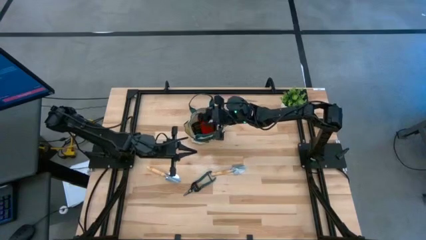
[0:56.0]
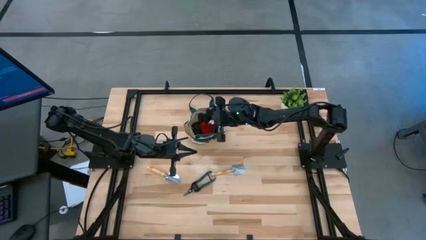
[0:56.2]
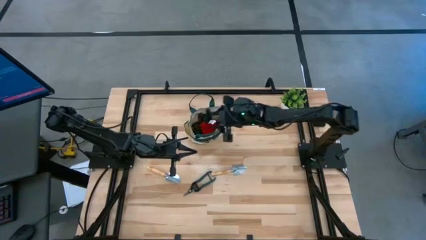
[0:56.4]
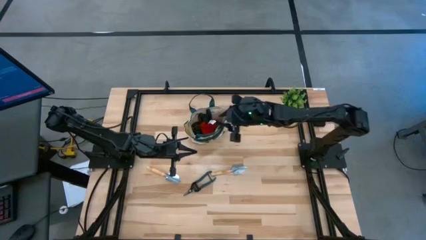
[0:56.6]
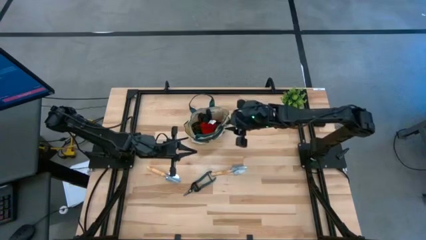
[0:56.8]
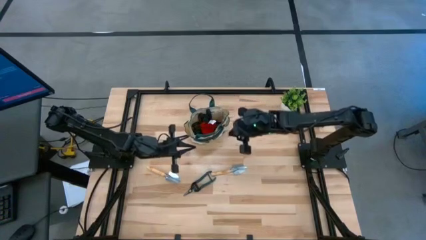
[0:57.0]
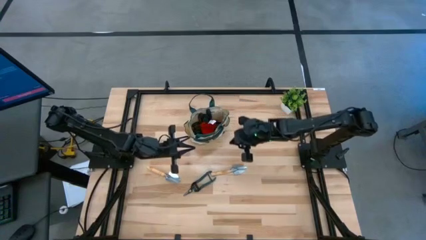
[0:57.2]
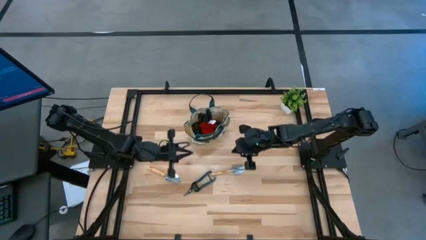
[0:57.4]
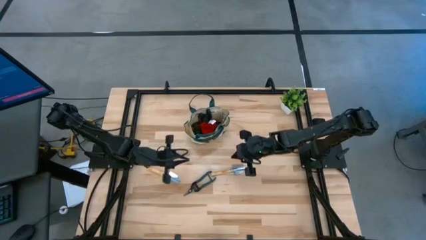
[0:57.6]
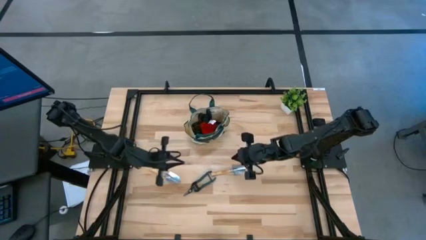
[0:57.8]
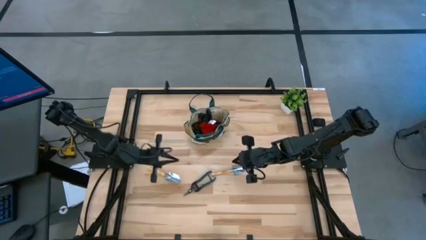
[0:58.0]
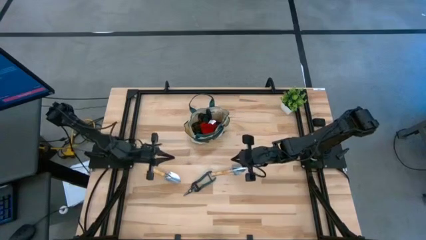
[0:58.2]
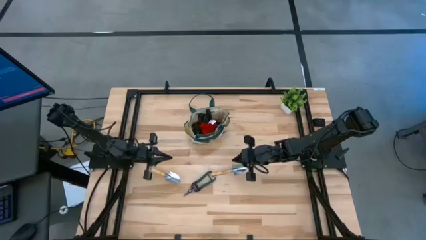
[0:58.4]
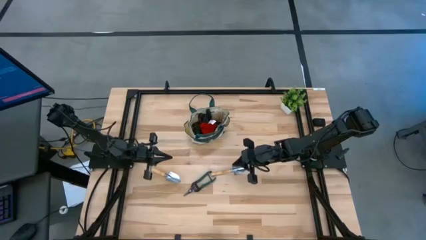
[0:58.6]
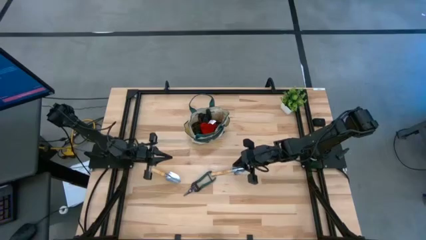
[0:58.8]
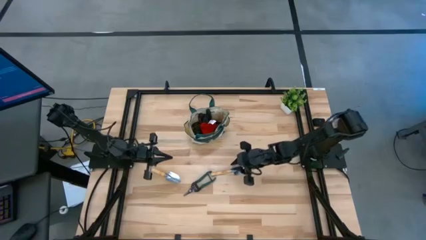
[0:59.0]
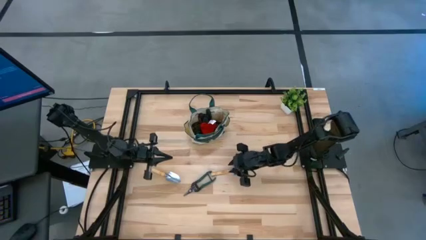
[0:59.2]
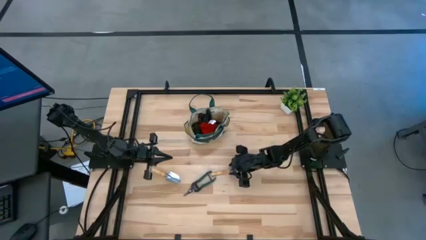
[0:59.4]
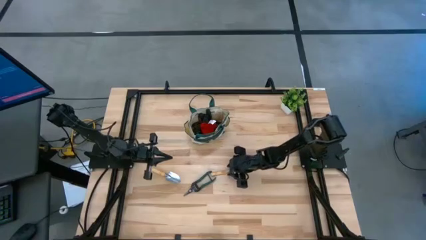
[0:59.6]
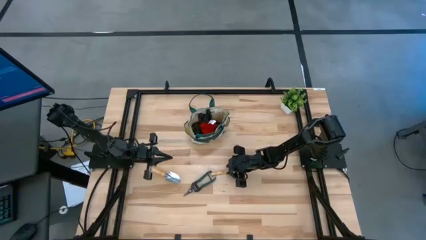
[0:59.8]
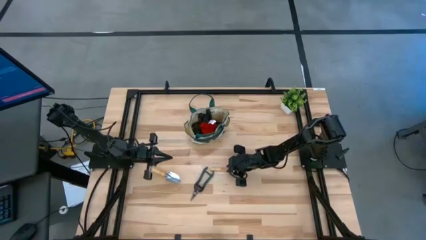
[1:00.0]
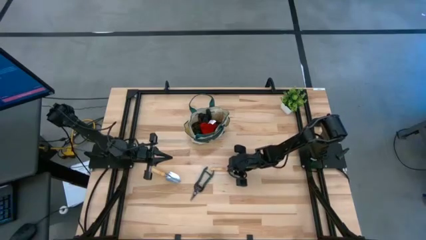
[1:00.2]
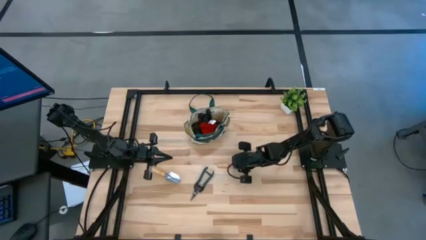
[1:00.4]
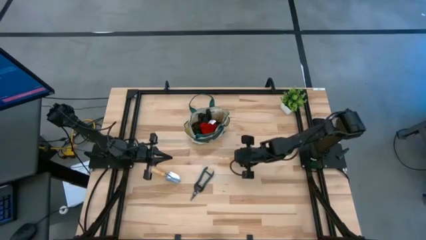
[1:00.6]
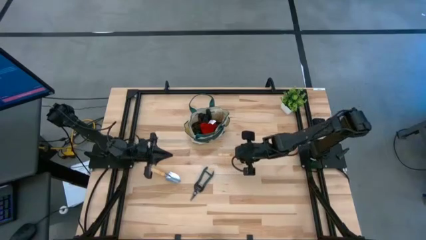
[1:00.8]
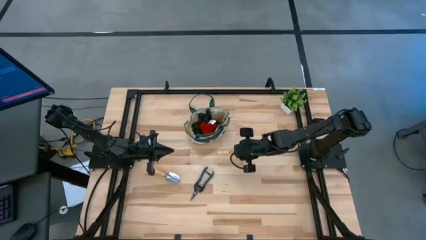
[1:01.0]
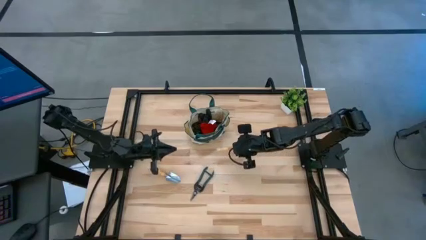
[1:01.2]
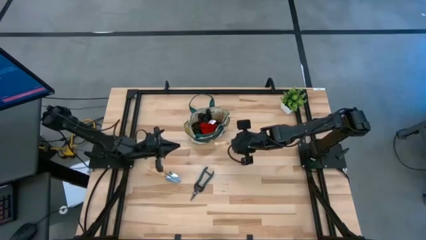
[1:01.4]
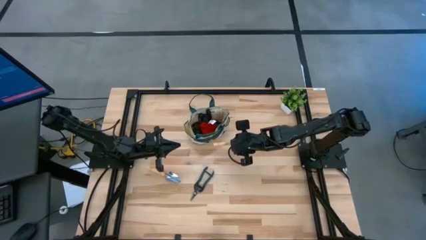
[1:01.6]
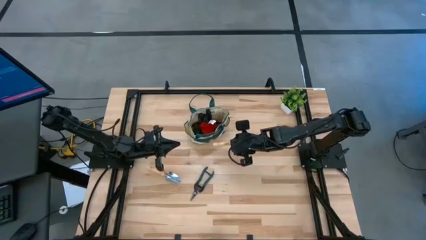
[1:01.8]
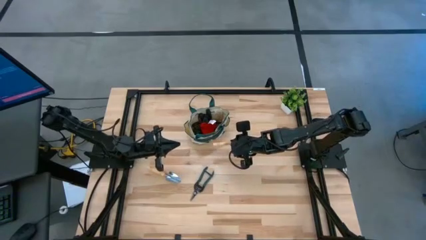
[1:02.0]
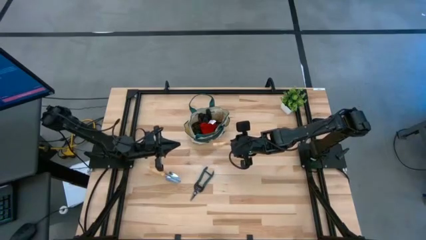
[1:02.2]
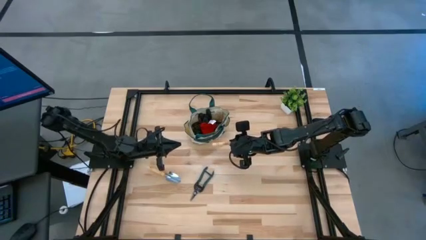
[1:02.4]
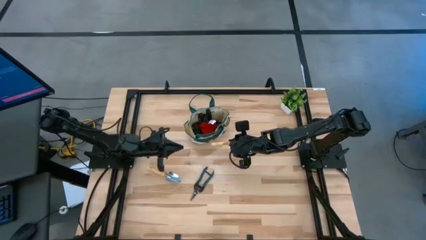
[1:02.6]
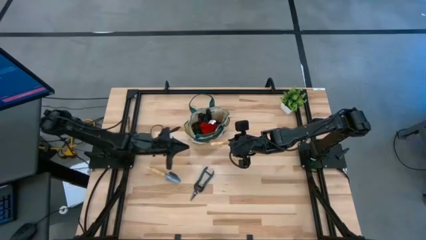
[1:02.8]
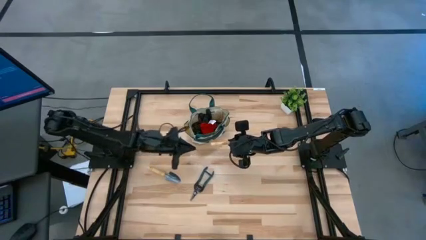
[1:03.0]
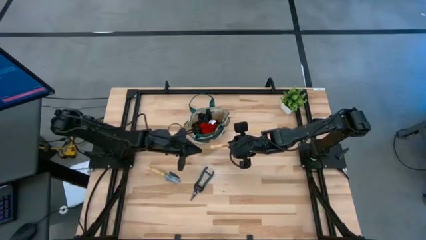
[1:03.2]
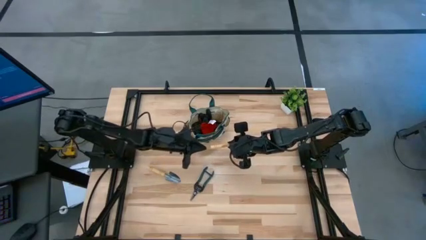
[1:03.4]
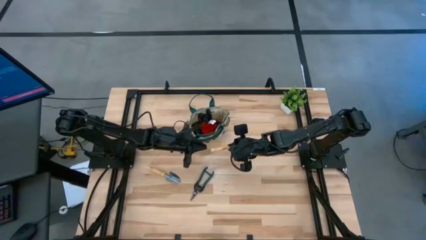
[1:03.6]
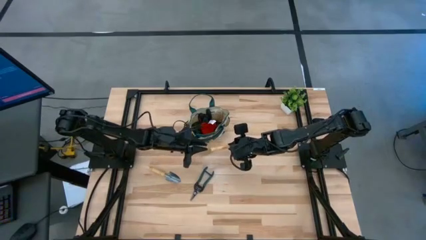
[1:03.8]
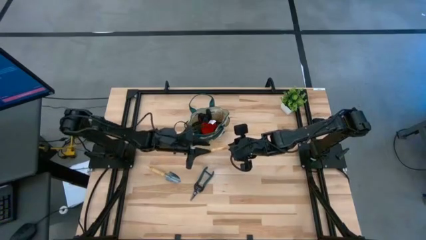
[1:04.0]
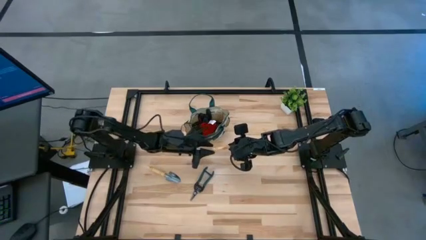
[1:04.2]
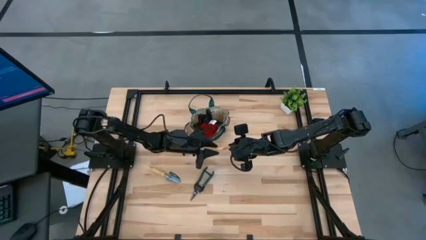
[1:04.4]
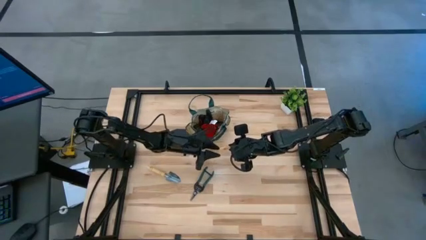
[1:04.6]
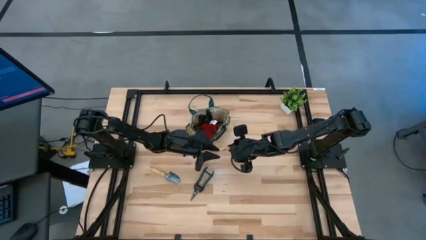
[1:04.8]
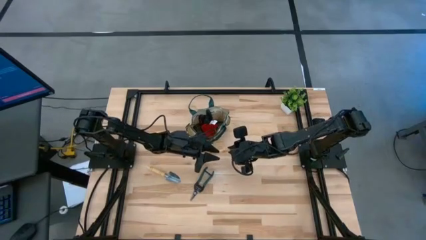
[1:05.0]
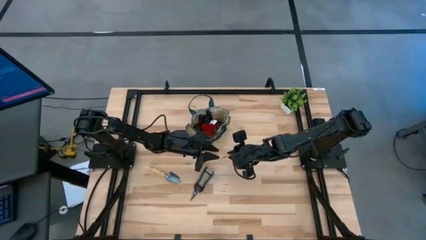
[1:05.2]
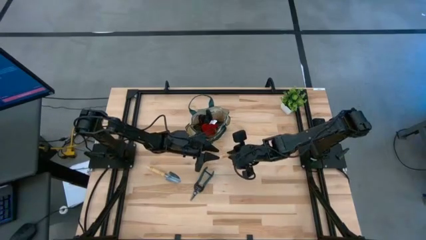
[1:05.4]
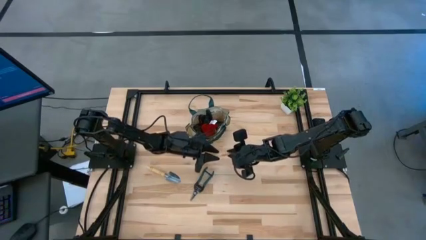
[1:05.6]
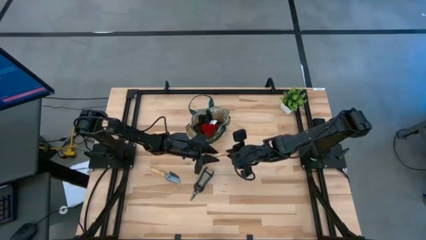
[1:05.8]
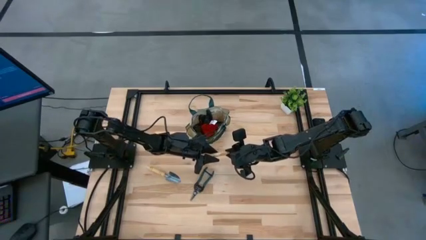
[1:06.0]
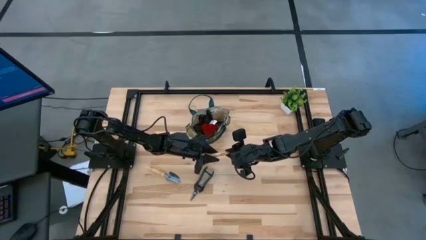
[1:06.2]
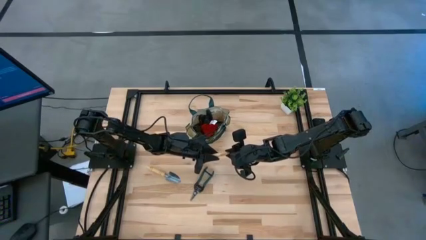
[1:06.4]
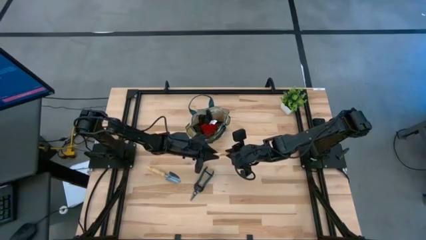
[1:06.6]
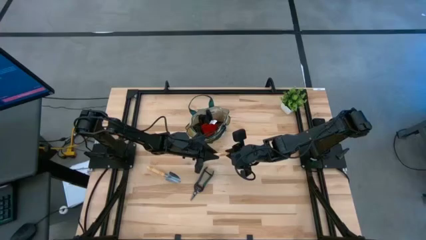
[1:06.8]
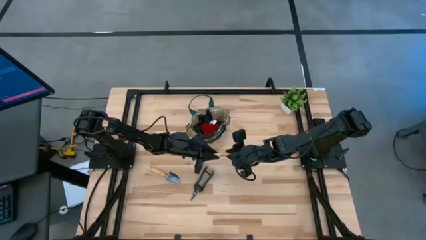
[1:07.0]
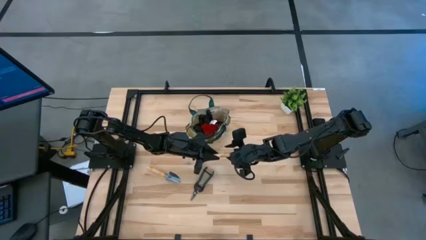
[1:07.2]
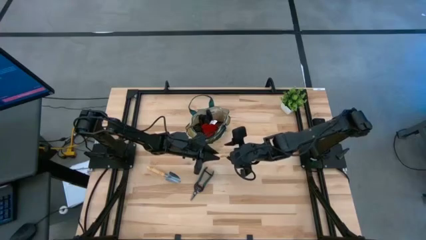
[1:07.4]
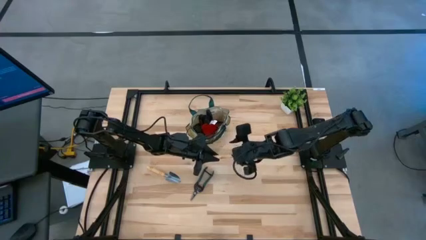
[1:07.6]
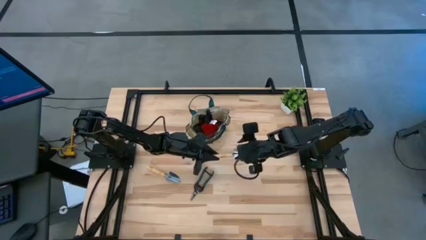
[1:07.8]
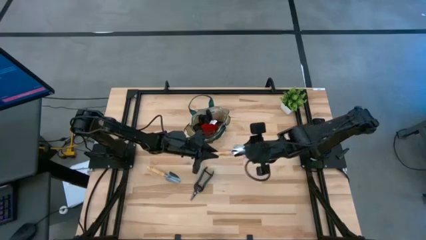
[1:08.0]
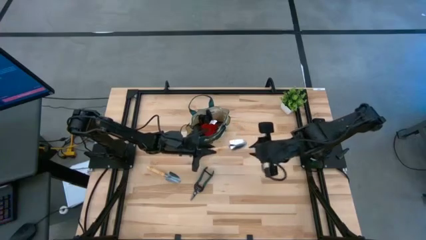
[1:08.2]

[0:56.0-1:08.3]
Task: Pick & Place Garden tools in Gardening bag
Put the brown right trowel into the brown gardening bag

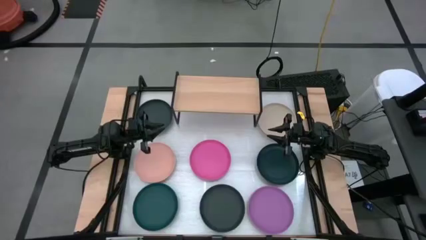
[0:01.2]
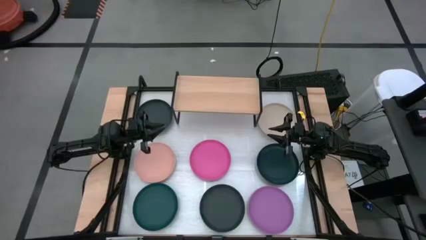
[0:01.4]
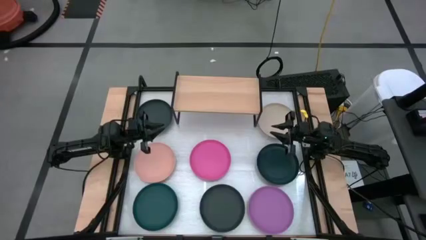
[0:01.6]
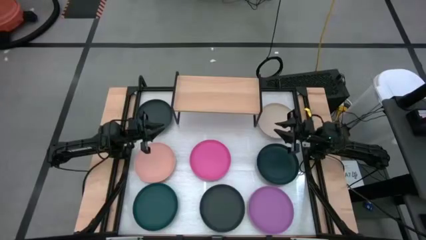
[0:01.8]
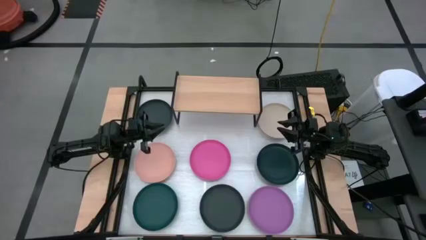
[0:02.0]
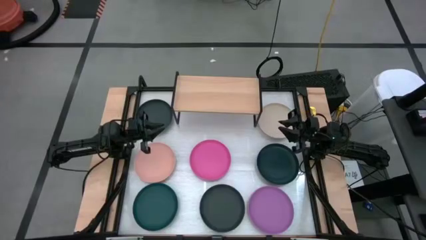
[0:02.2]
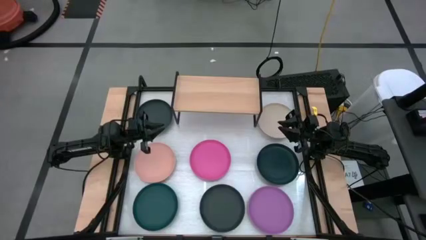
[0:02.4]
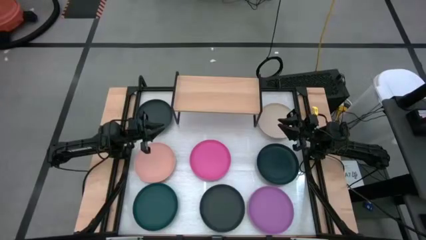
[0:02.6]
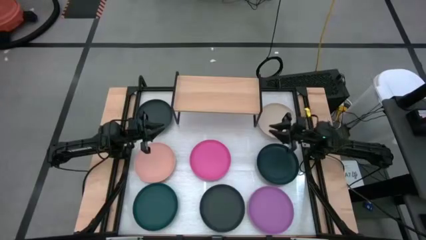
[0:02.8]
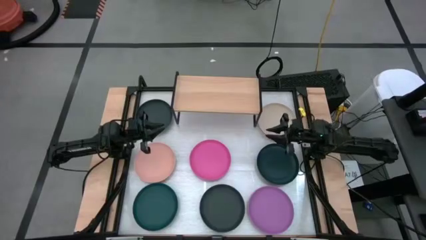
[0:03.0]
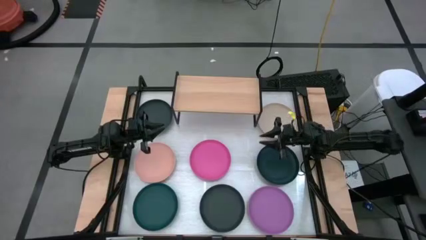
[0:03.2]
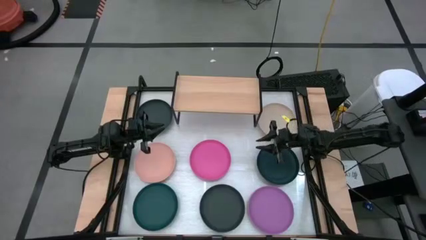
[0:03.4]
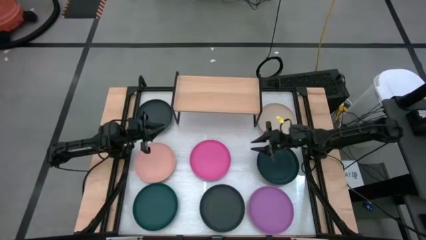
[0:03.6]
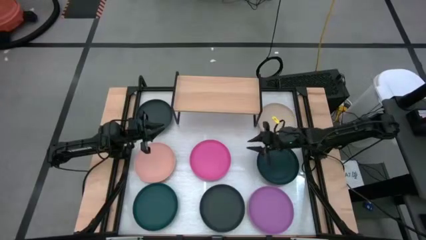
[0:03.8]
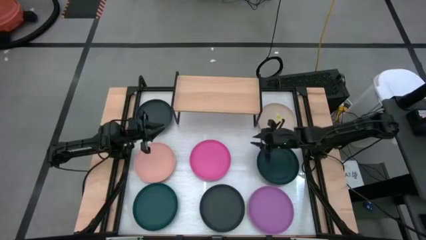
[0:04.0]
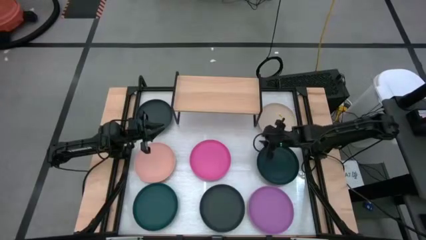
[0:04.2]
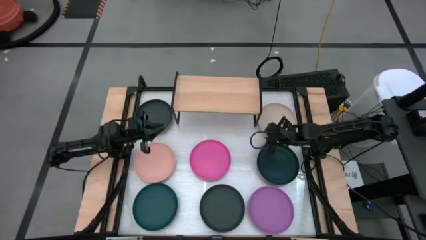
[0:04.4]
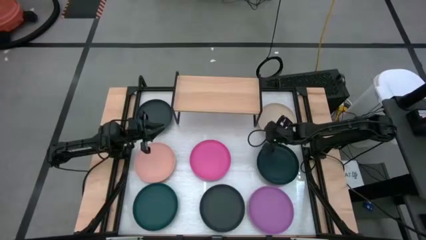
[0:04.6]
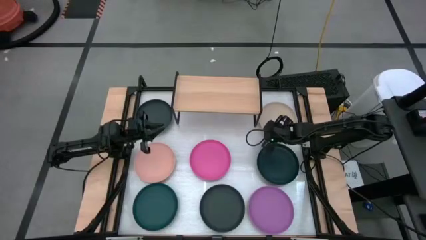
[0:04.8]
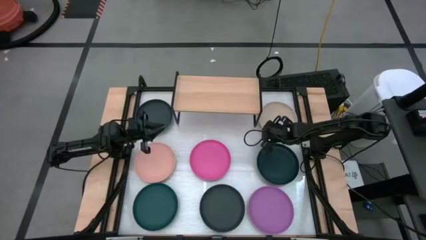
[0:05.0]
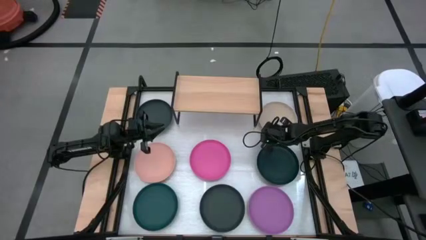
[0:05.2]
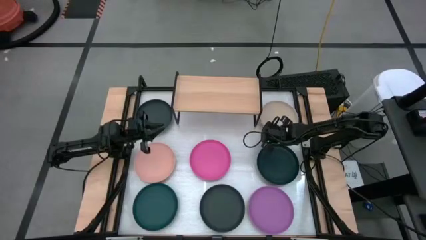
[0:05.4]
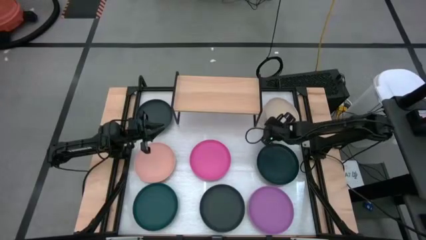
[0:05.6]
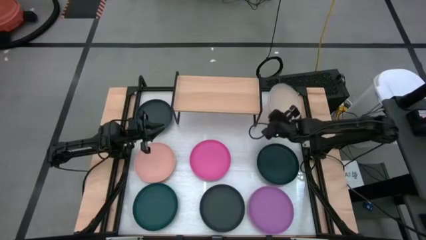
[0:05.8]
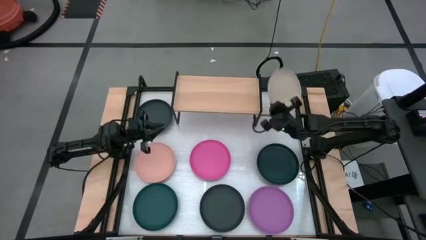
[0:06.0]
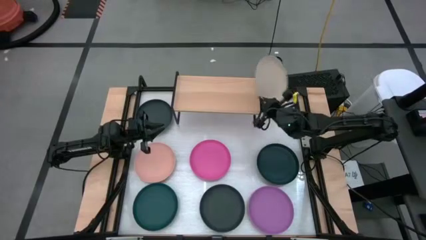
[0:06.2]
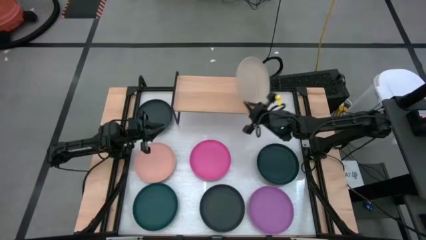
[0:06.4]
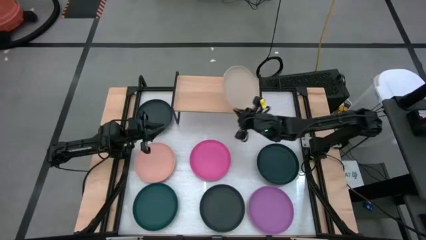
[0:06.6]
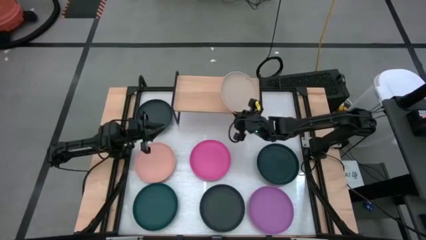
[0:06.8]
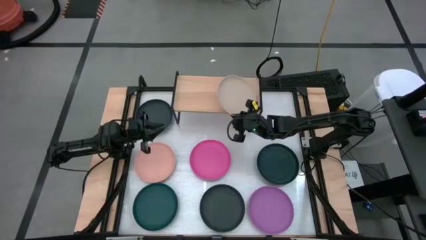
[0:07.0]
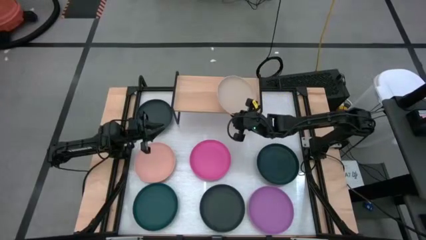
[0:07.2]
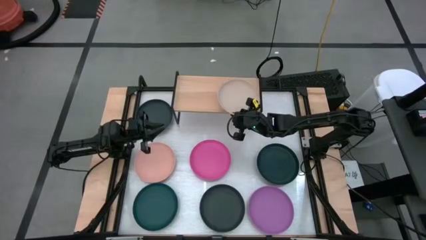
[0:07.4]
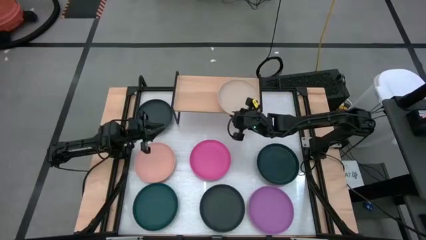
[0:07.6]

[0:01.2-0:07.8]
Task: Place and stack plates onto a shelf
Put the light brown plate on the shelf
